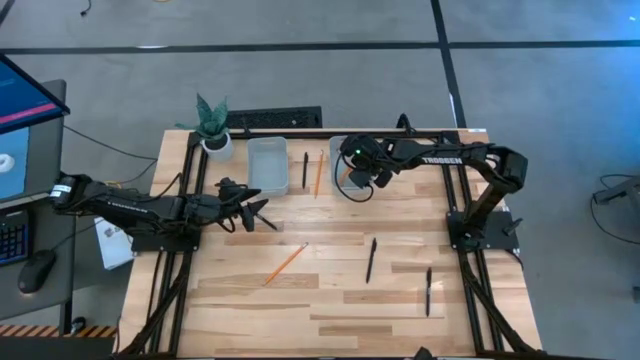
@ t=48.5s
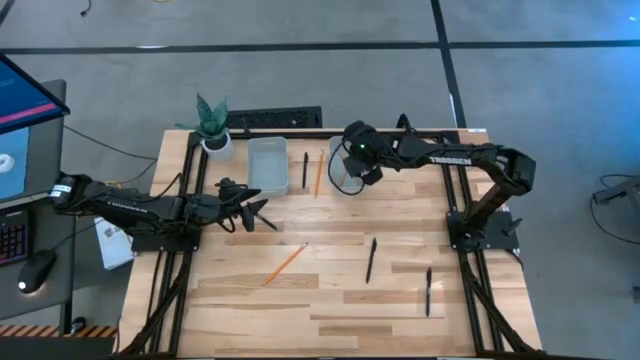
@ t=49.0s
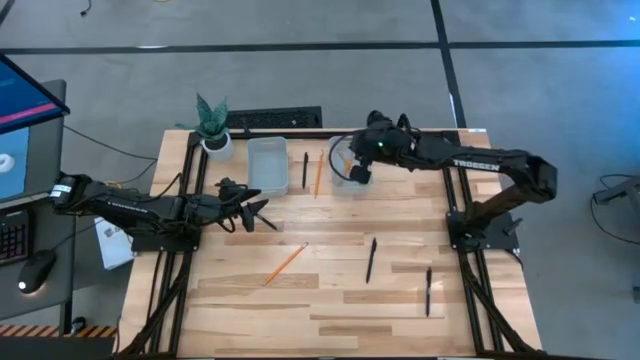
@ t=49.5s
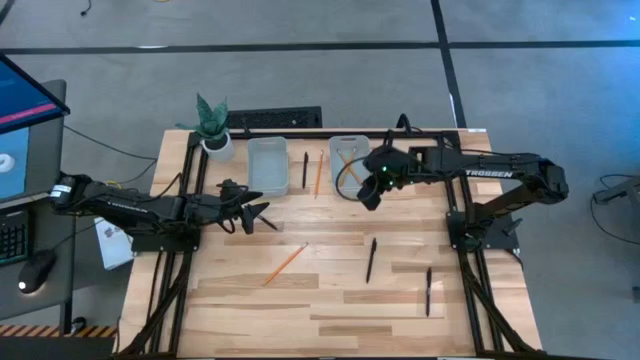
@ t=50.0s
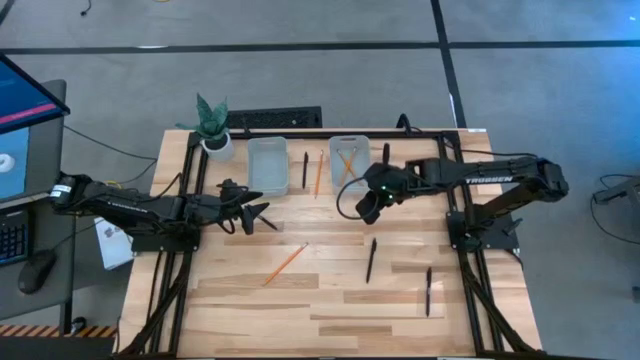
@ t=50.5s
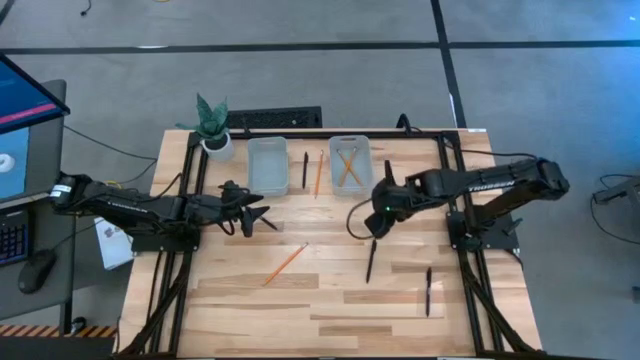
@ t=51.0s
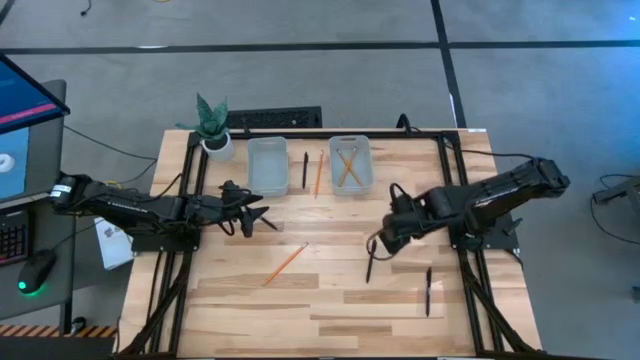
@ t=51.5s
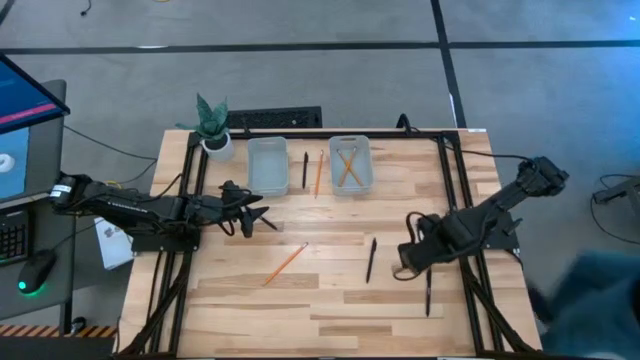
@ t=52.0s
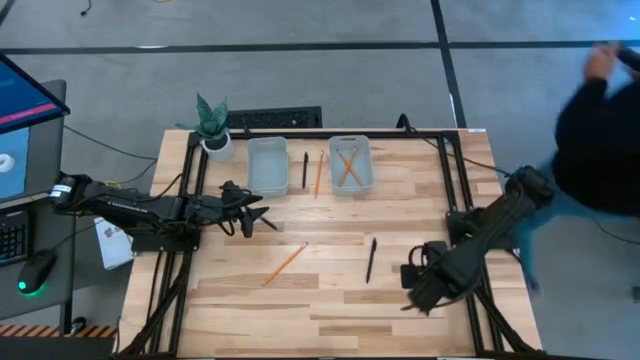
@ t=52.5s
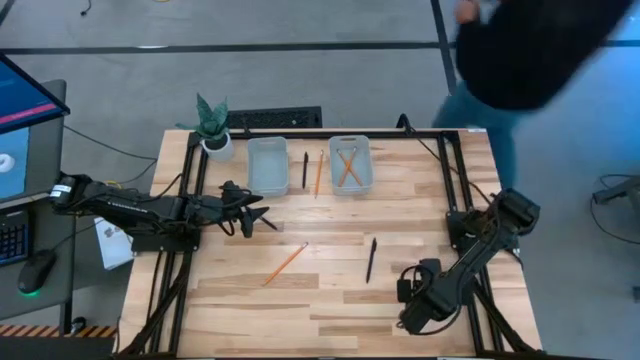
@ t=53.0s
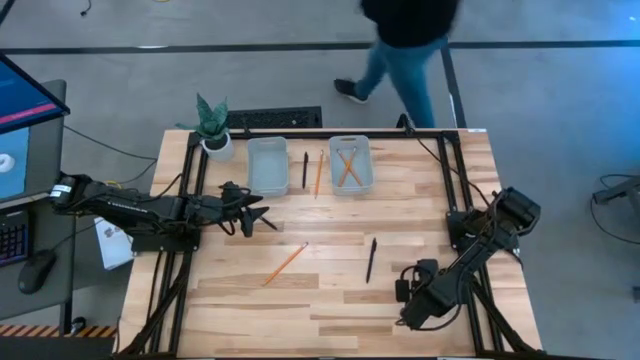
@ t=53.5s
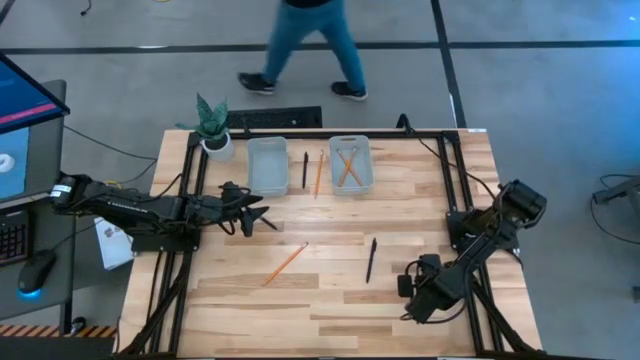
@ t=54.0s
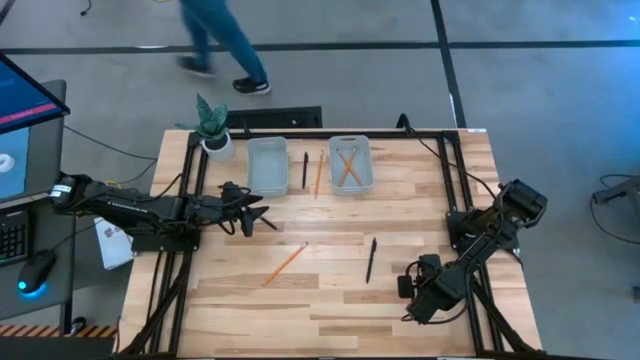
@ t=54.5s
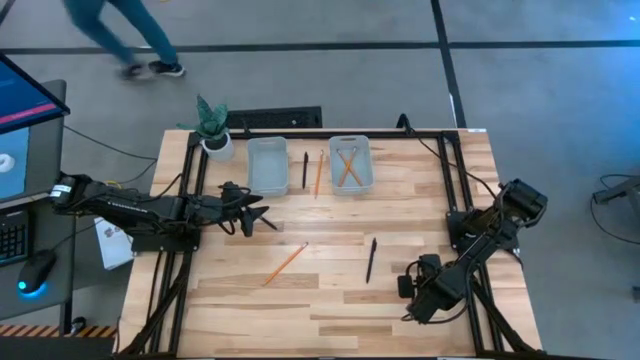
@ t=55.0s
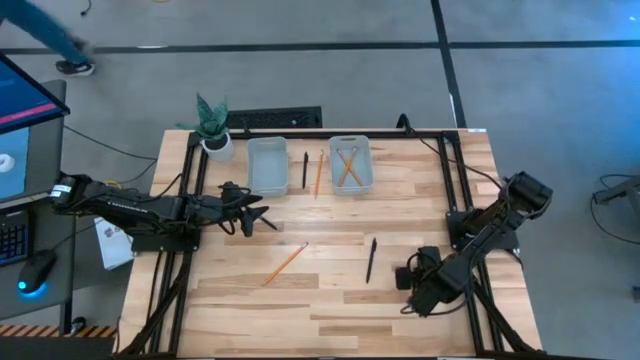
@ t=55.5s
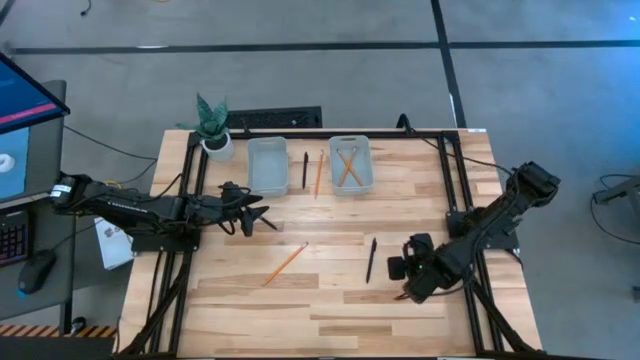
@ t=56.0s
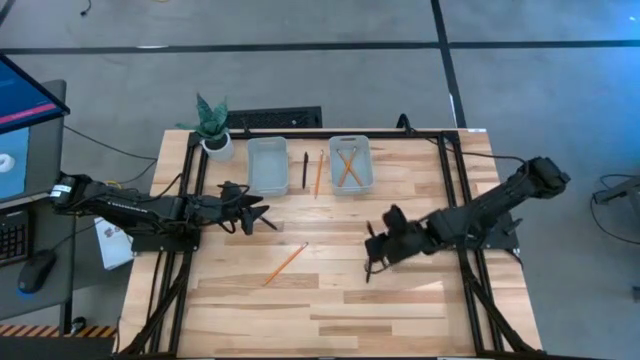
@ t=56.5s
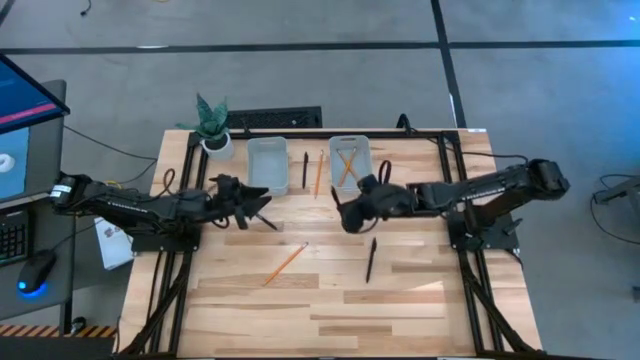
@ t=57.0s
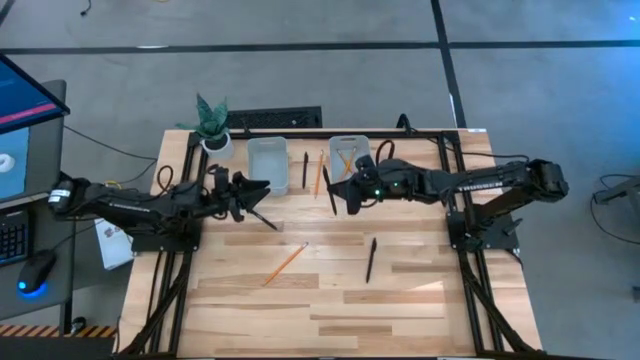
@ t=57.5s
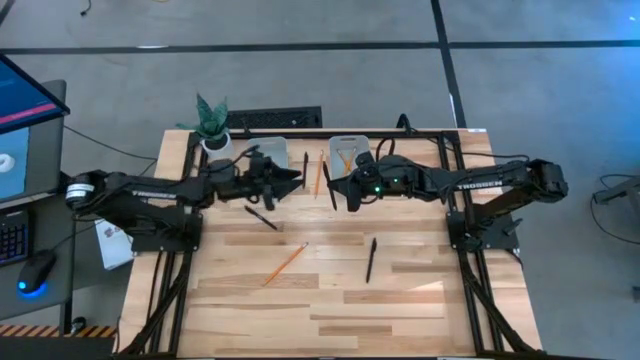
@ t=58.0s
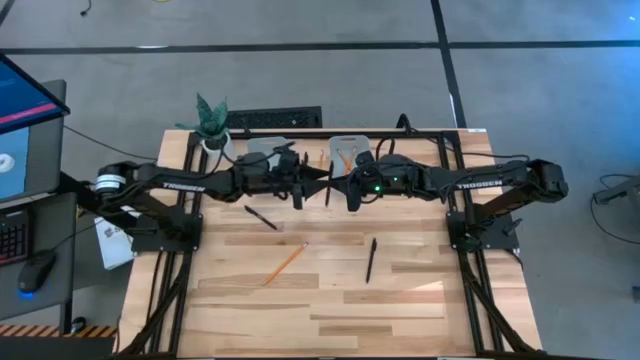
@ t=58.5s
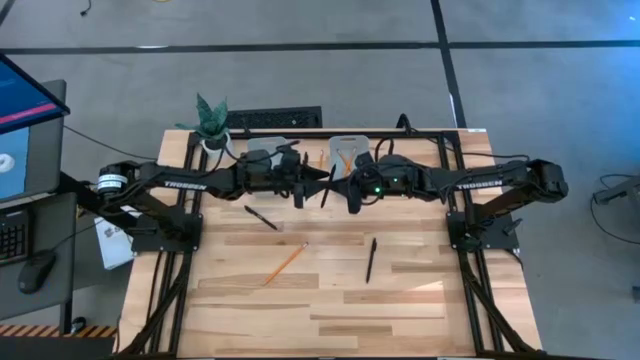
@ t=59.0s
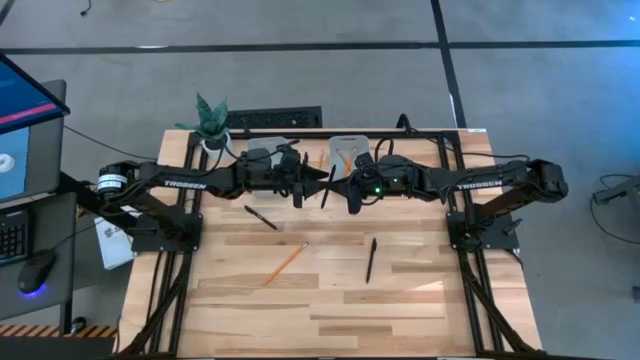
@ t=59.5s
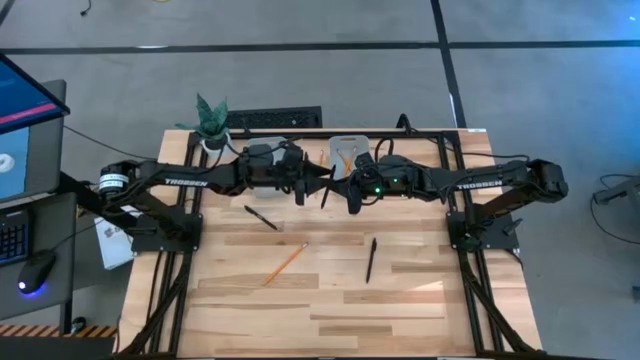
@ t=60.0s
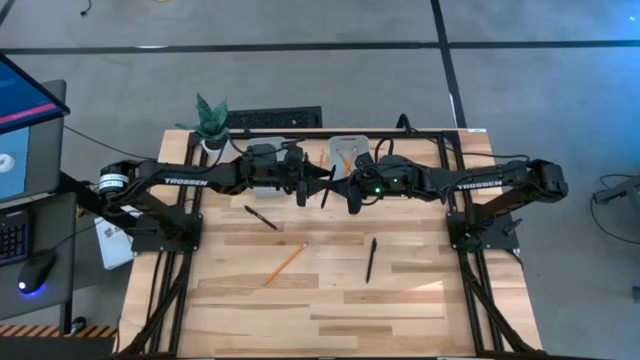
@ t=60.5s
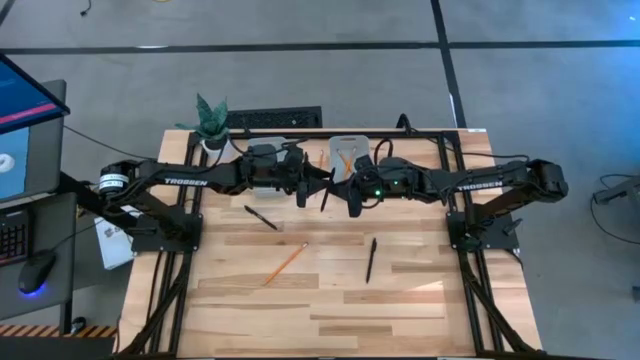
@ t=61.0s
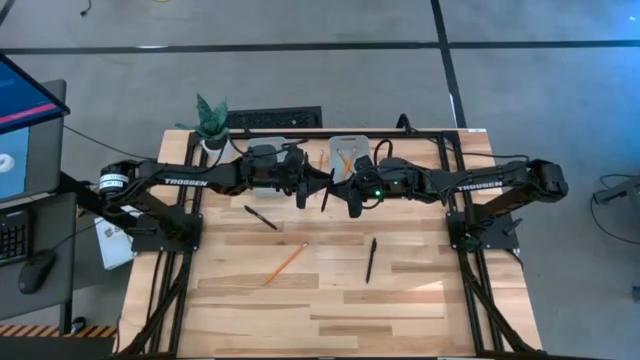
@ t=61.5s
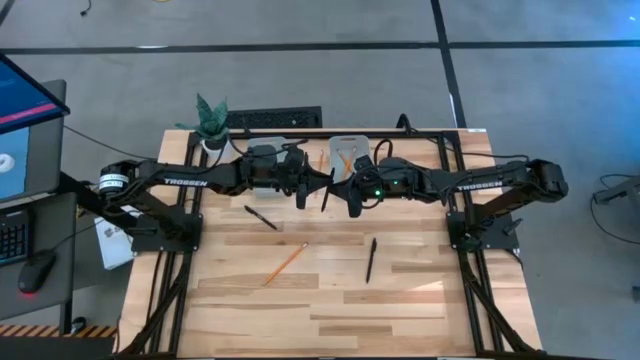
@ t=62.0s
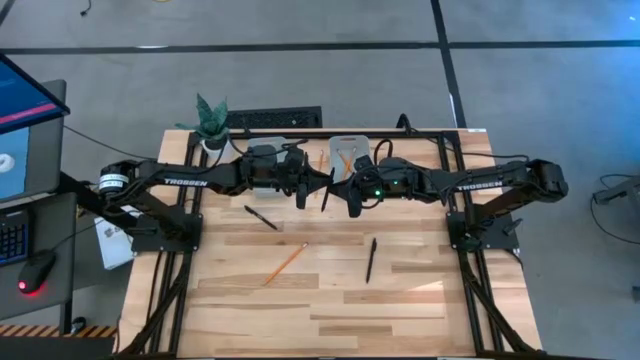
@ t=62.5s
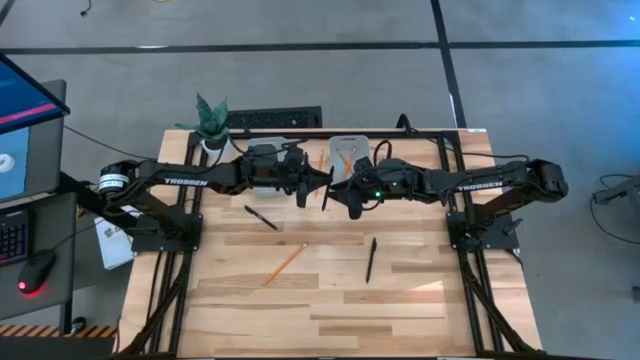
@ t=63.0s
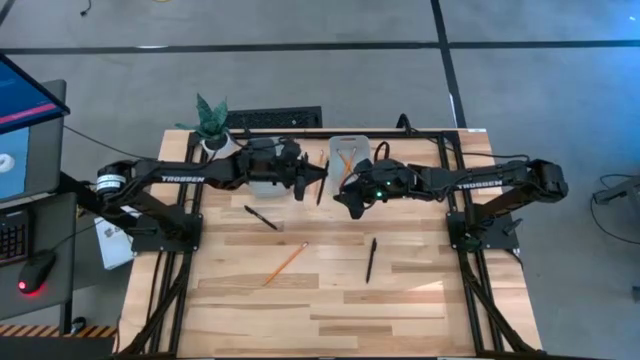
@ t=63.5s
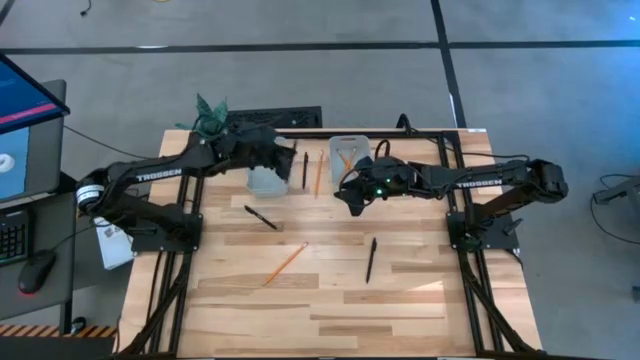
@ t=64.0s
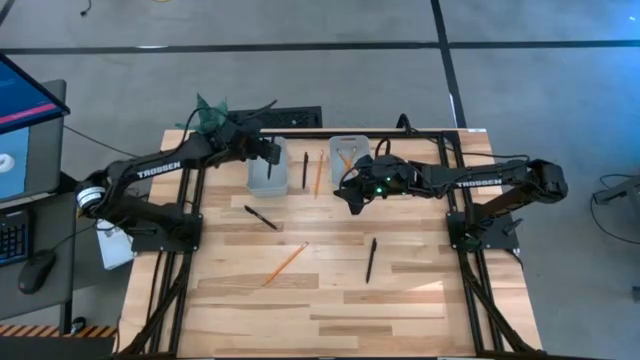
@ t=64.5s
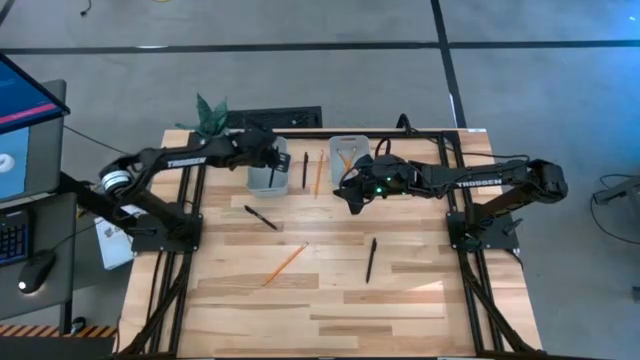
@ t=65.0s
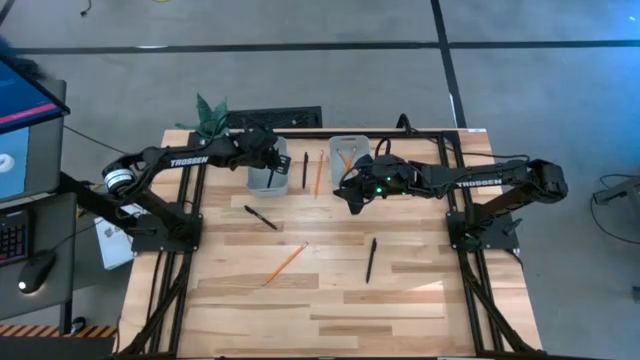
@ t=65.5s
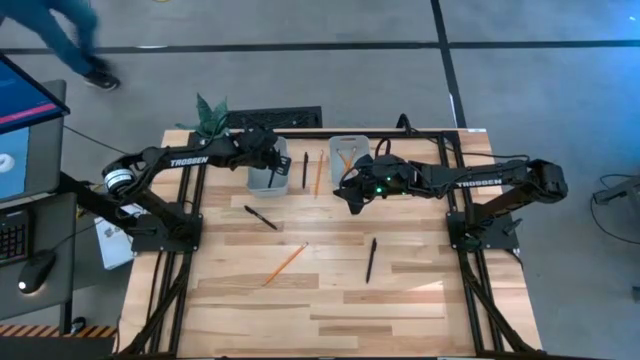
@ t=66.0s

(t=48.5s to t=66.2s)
Task: Sort pens & pencils
Put the black pen into the left gray bin
